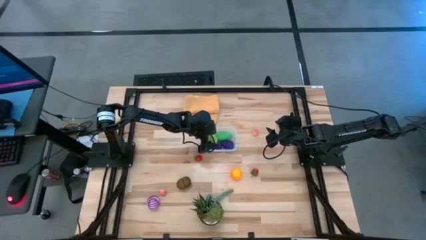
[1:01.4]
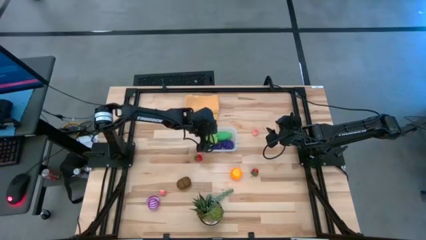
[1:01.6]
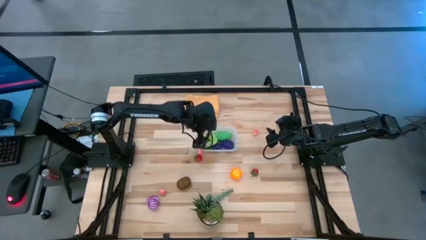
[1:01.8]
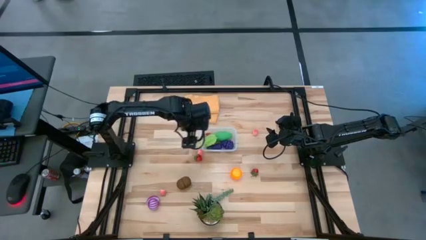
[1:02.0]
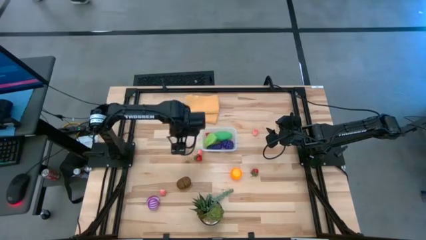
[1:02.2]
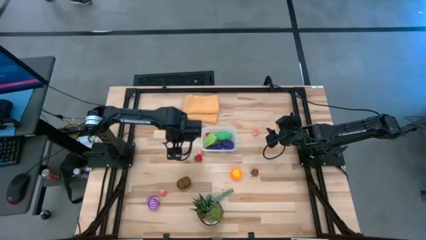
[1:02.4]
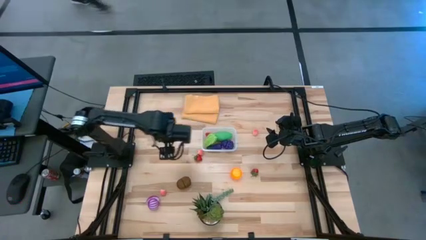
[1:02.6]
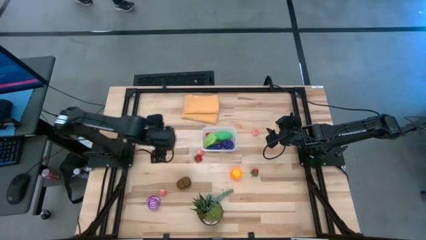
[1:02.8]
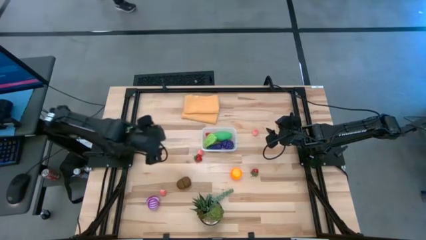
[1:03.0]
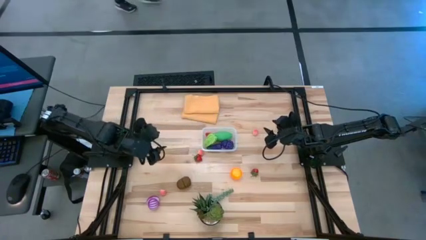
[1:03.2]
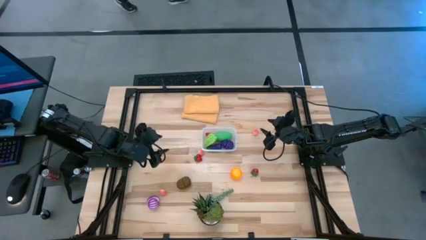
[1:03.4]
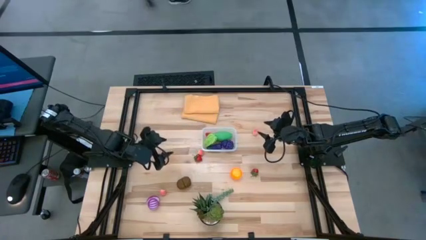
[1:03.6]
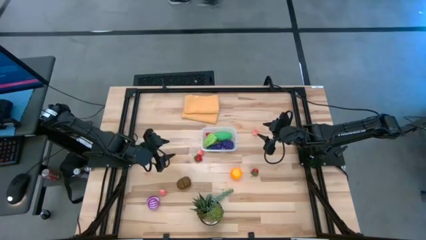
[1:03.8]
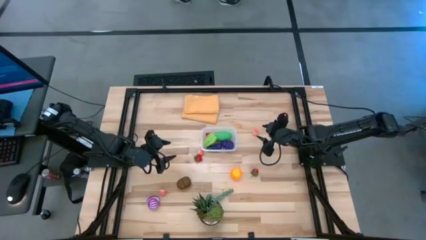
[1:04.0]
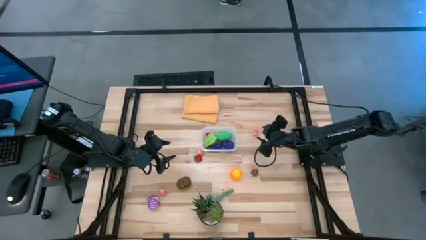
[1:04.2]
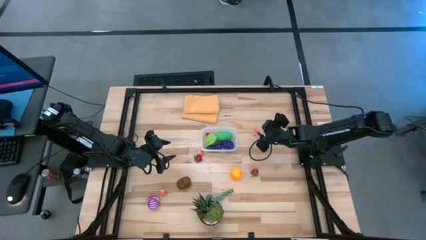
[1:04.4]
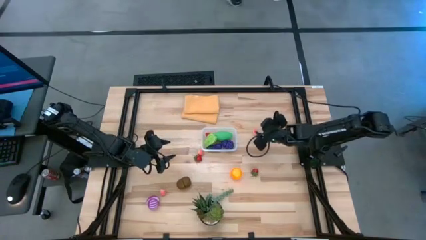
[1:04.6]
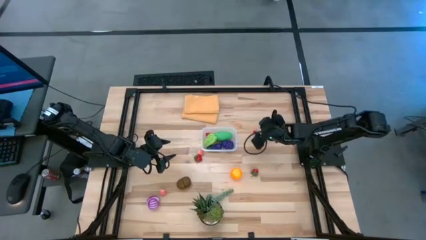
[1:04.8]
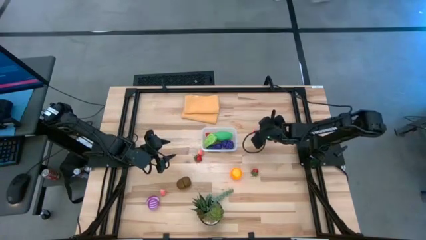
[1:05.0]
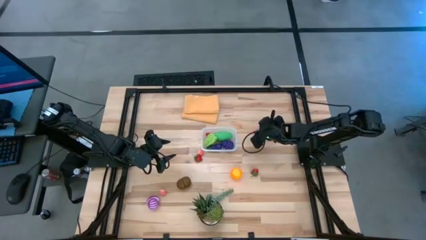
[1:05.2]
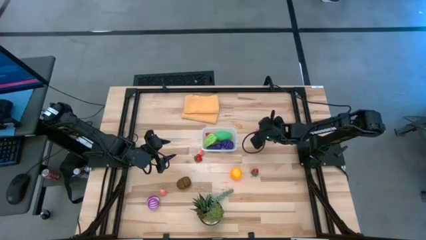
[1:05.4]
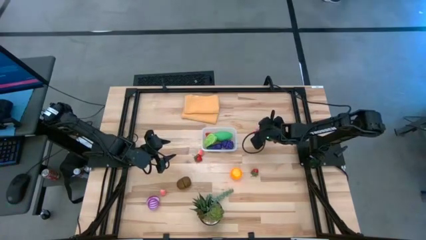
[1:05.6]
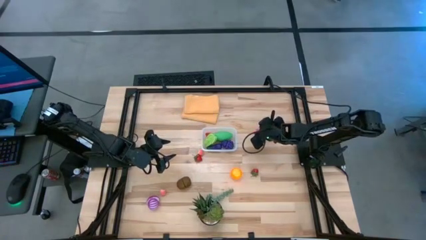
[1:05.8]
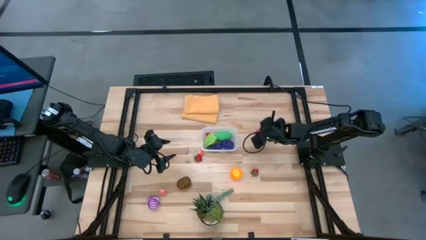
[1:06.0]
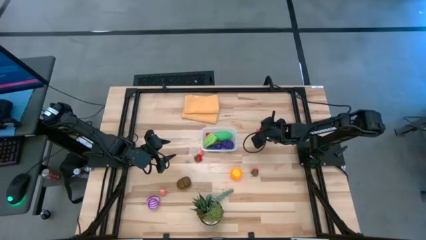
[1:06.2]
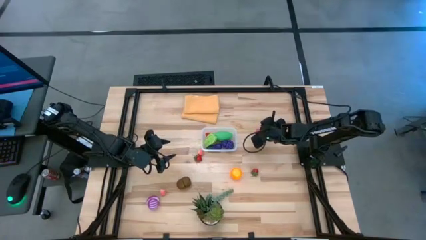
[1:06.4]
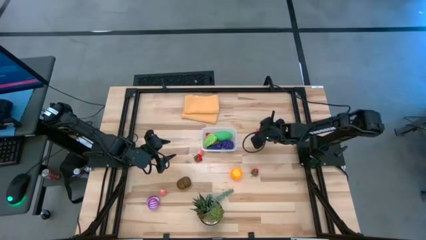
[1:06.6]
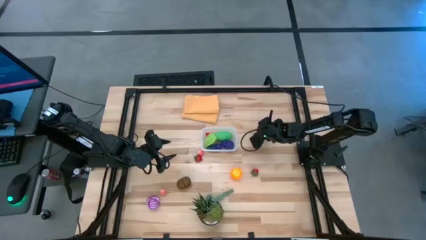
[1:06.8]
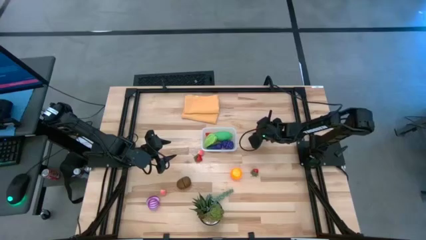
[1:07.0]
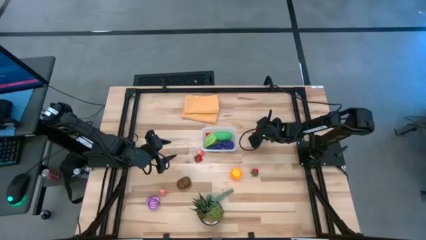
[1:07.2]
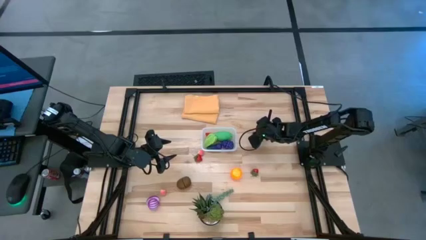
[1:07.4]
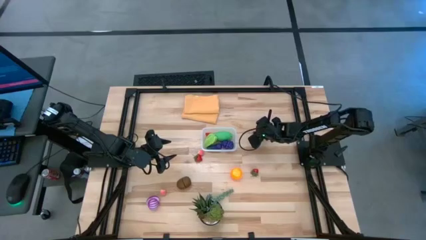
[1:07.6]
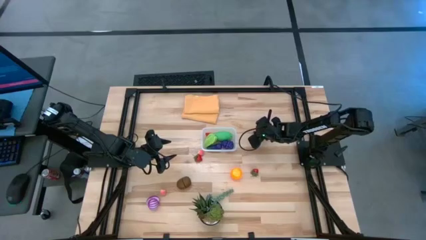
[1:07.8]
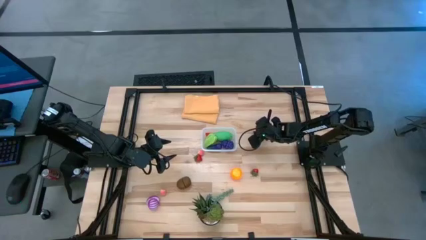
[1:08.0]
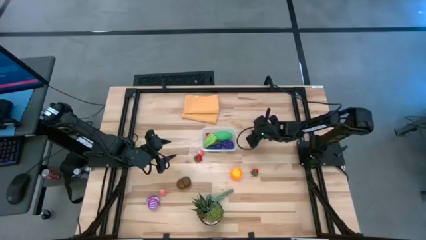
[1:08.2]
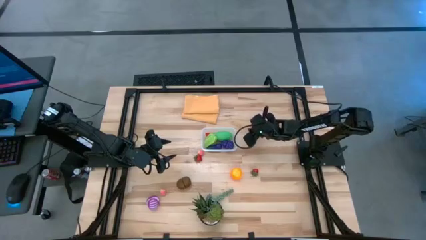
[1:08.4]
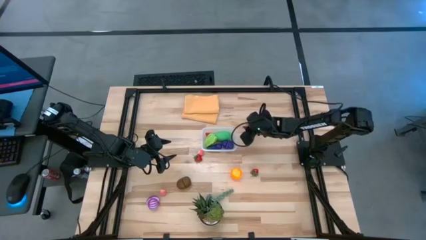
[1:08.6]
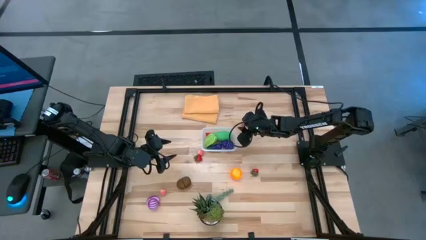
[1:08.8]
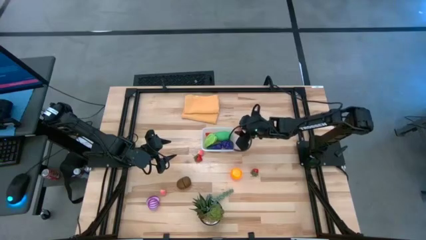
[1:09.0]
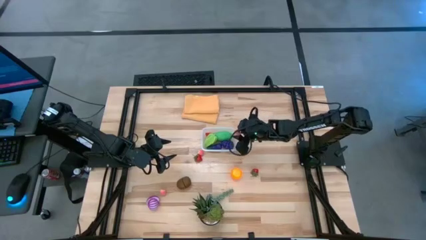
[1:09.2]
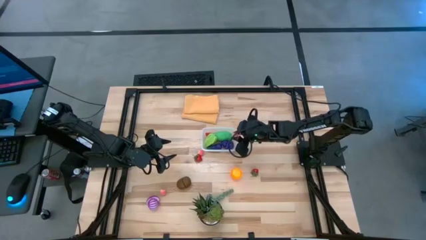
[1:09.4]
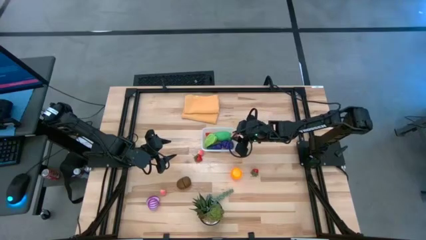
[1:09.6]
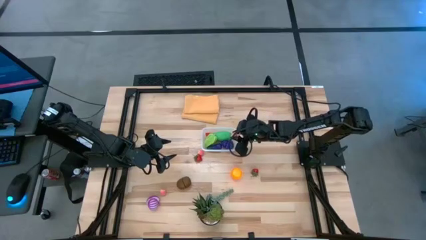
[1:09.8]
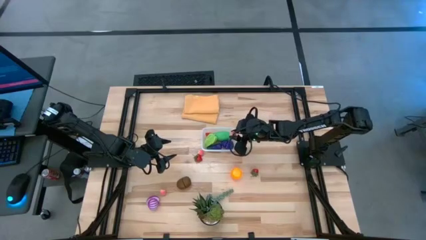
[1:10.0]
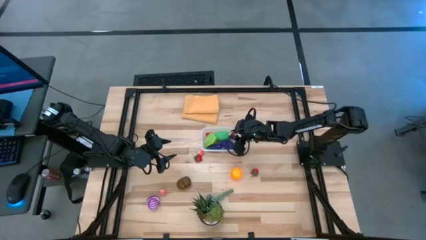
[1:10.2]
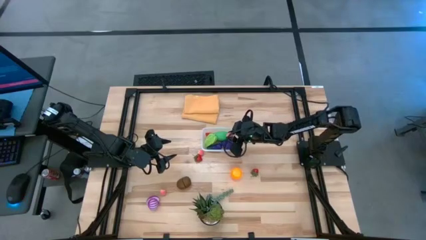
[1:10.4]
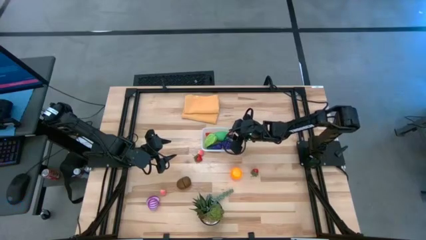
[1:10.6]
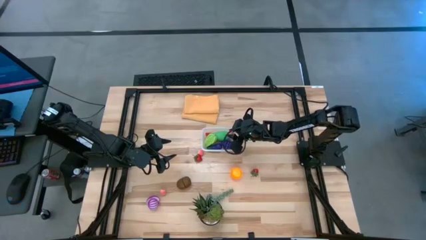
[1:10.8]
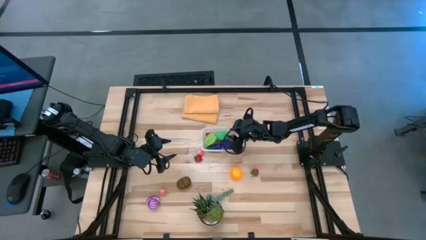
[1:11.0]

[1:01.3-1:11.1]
Task: Pick and placing Produce into tupperware
Put the top pink peach into the transparent container

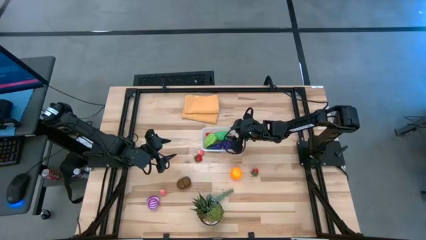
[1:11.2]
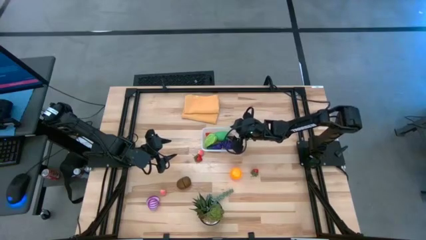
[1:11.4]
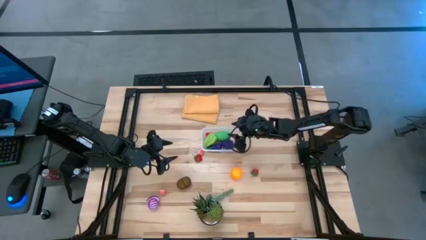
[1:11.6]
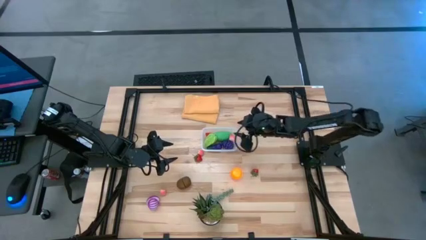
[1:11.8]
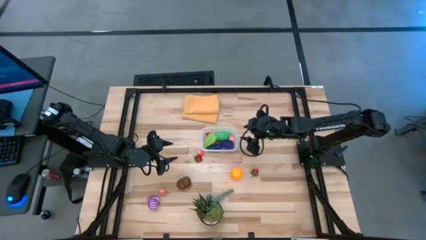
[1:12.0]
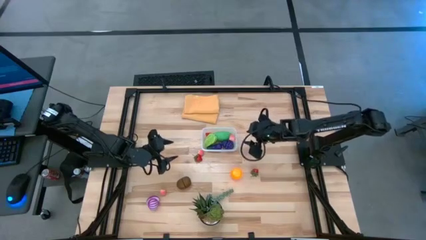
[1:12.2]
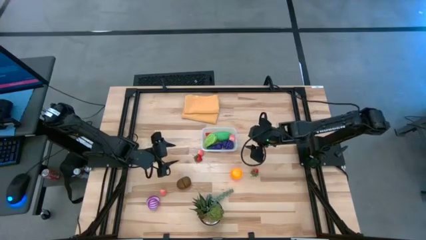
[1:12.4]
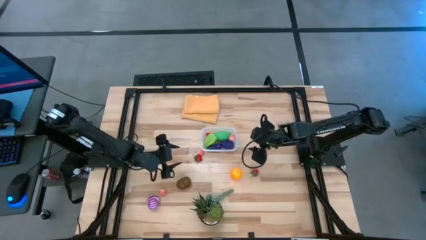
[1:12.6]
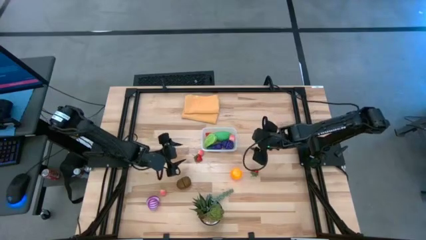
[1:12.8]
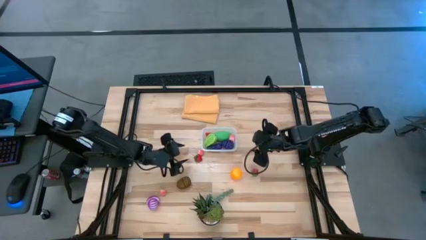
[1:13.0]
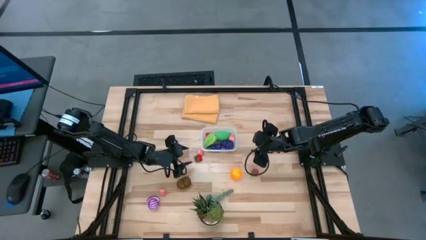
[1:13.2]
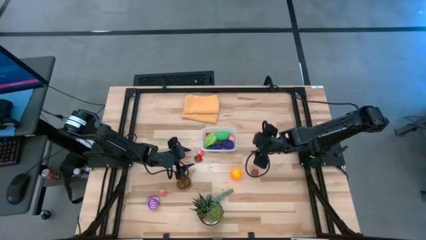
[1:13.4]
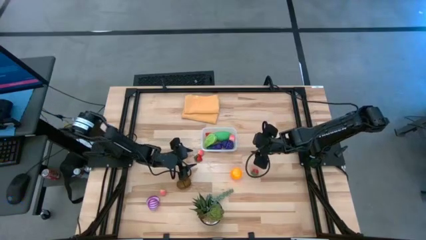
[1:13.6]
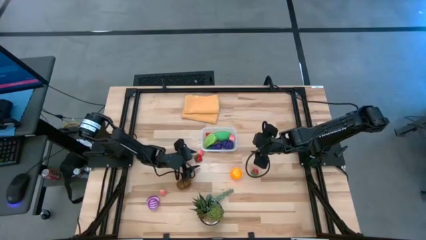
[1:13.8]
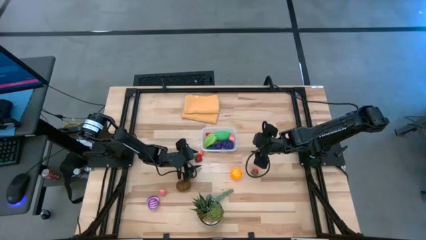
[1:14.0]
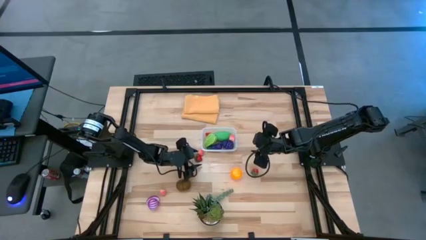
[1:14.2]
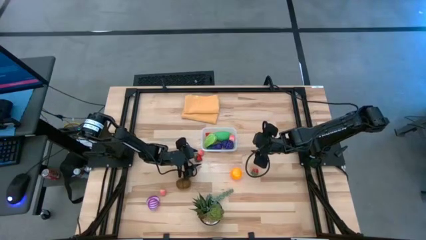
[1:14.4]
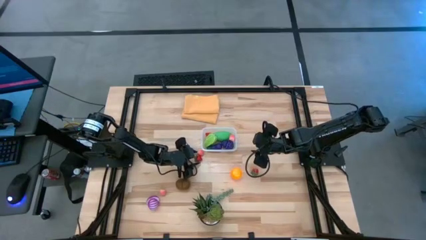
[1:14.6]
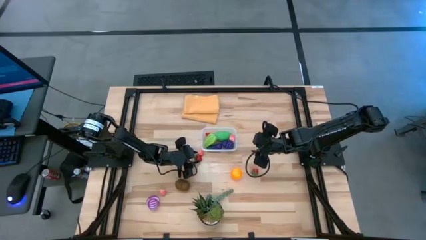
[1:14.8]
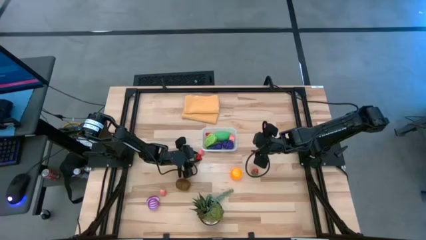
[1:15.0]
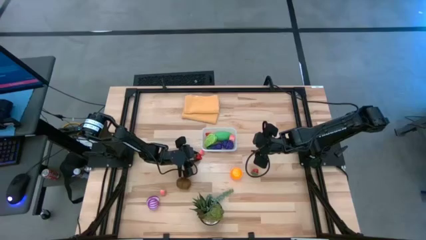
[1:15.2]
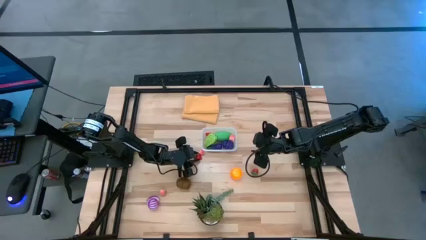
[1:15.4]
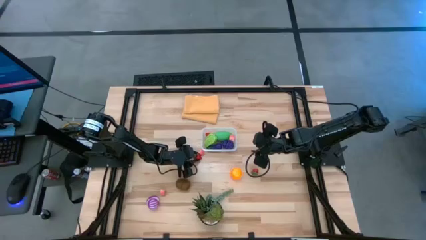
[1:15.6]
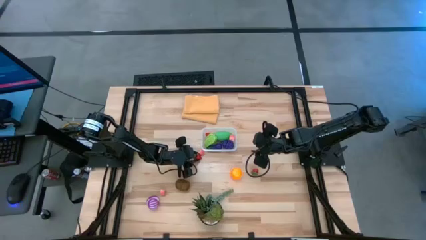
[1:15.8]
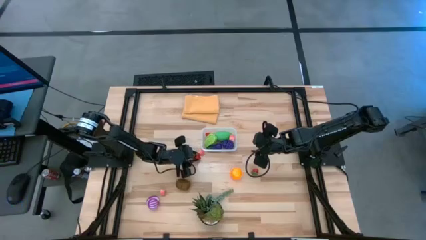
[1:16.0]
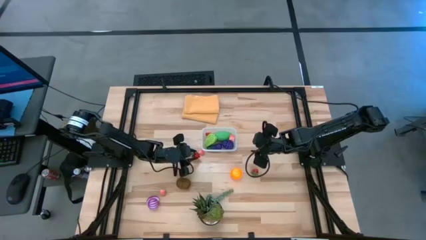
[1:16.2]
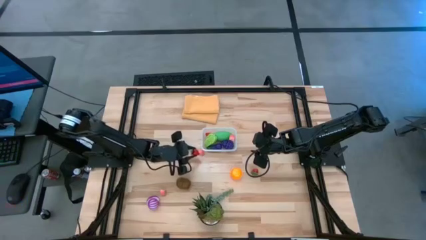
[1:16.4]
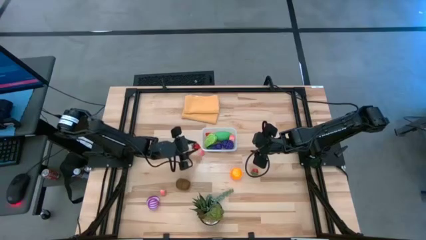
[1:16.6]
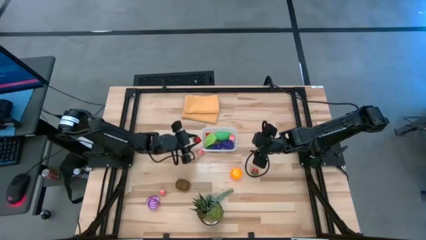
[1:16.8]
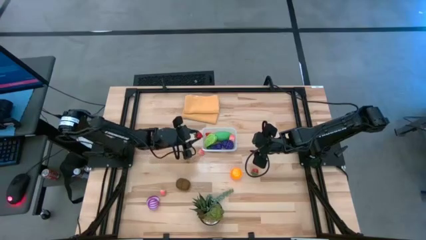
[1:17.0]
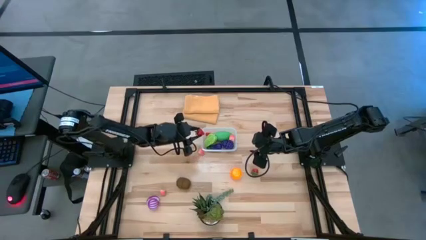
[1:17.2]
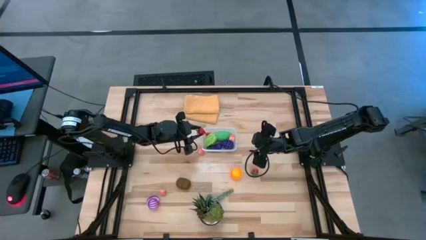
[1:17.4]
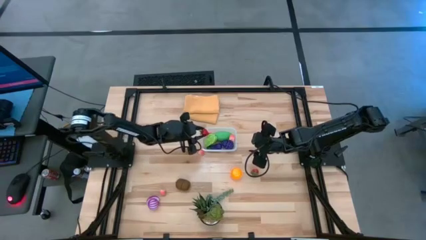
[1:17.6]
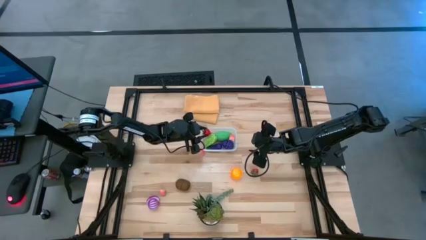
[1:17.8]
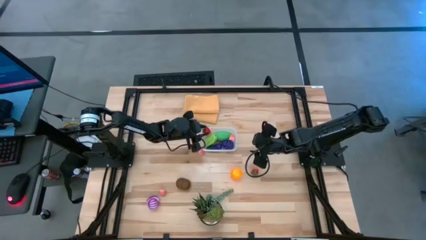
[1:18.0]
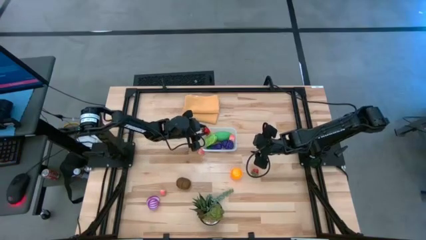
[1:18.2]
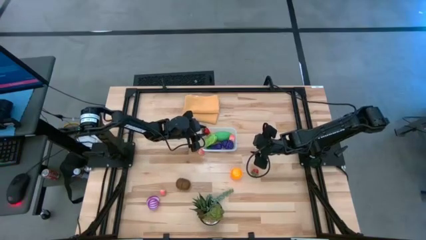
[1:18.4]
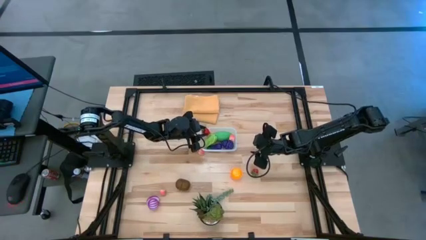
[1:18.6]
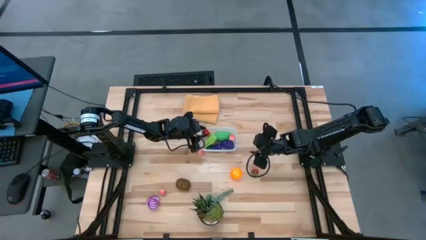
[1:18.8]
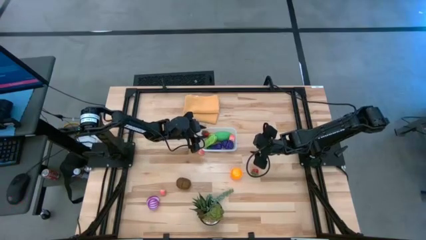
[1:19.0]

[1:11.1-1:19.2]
Put the left red strawberry into the transparent container
